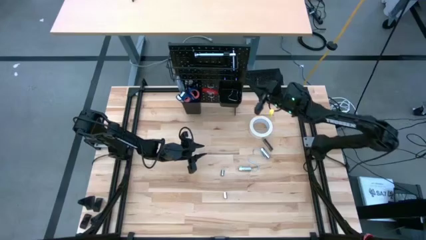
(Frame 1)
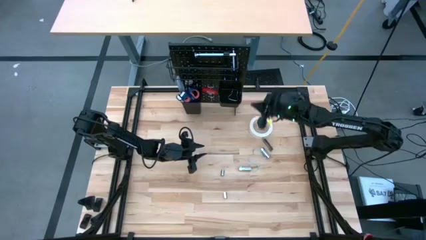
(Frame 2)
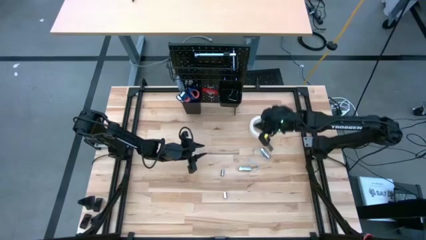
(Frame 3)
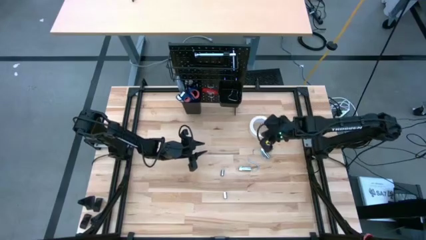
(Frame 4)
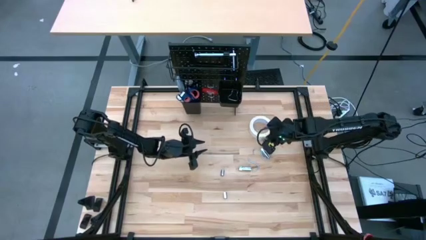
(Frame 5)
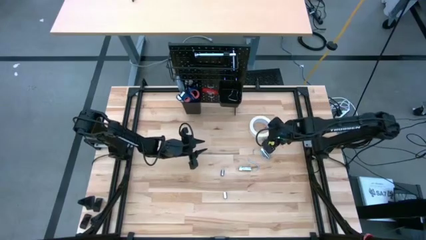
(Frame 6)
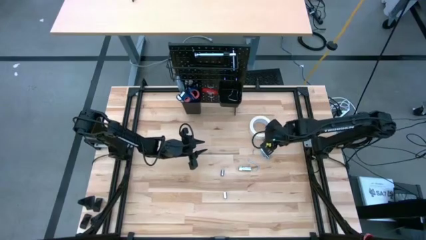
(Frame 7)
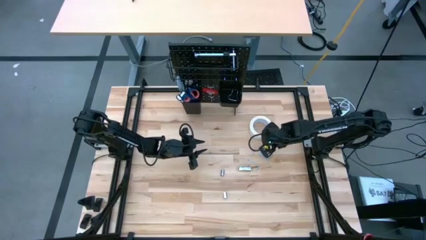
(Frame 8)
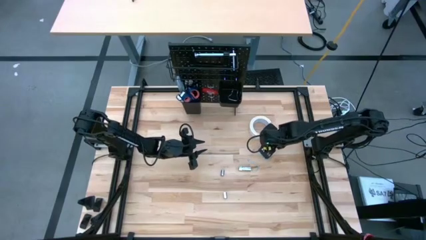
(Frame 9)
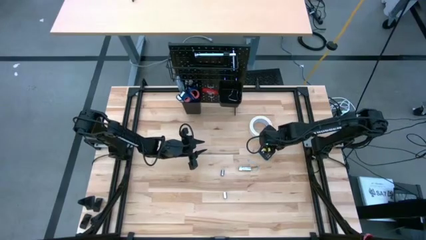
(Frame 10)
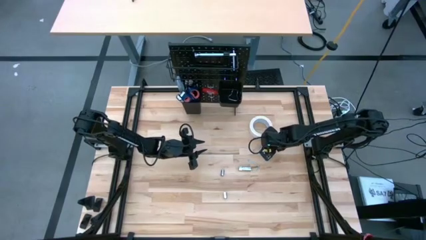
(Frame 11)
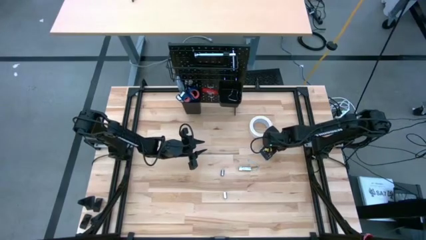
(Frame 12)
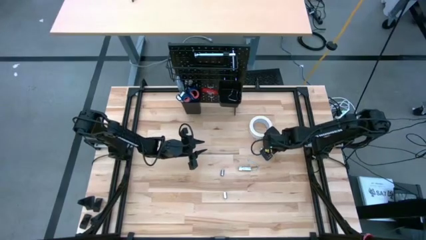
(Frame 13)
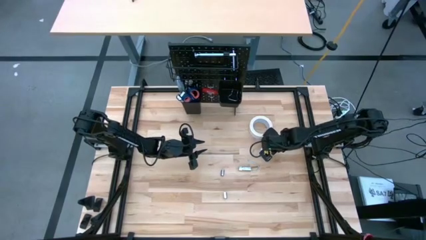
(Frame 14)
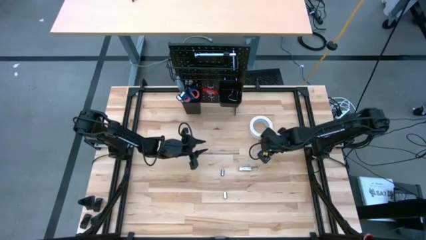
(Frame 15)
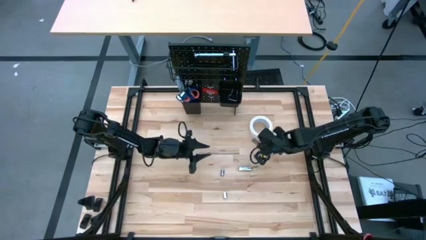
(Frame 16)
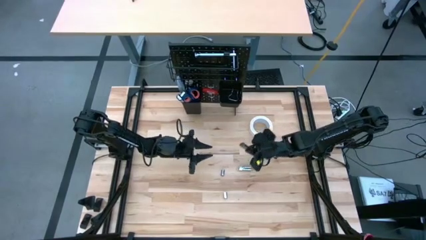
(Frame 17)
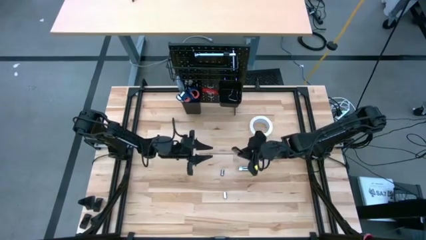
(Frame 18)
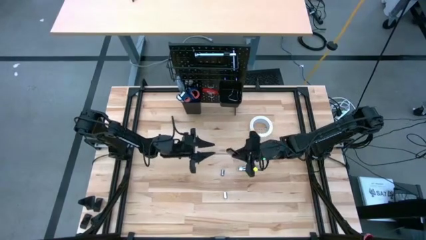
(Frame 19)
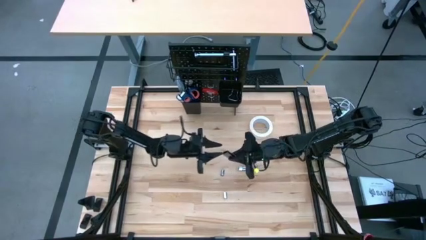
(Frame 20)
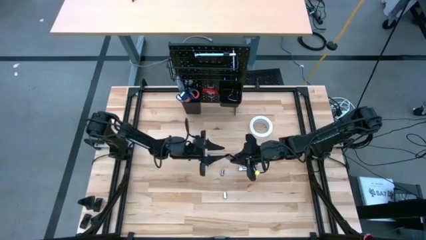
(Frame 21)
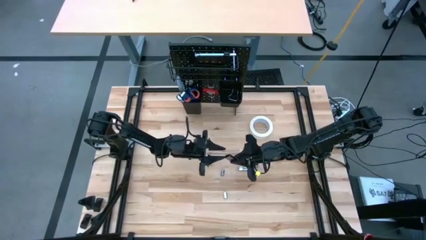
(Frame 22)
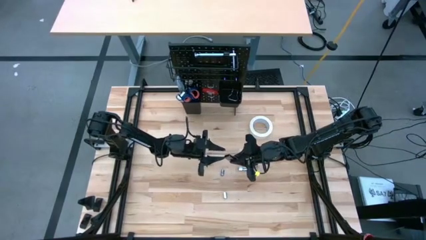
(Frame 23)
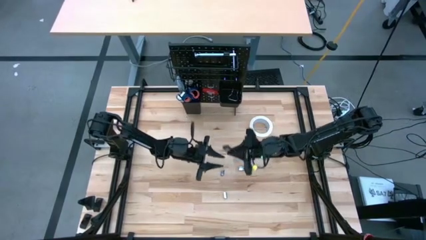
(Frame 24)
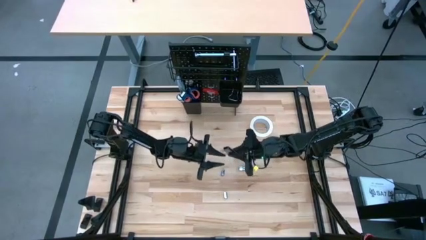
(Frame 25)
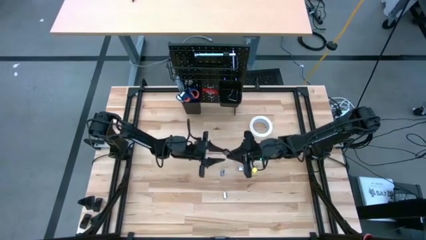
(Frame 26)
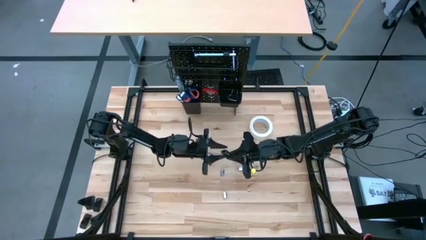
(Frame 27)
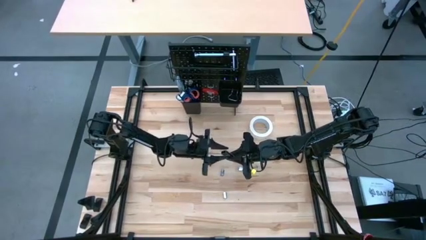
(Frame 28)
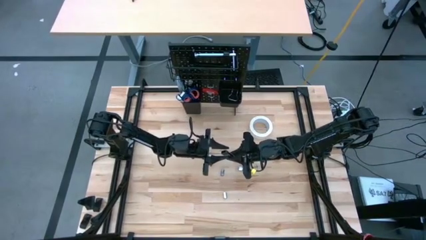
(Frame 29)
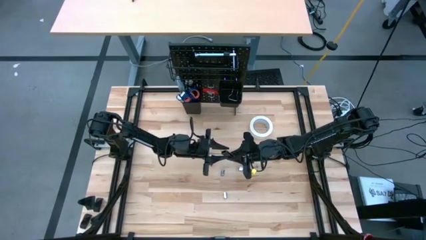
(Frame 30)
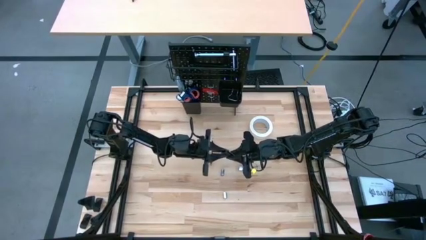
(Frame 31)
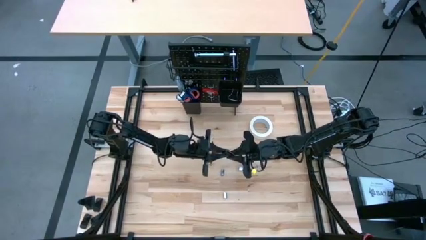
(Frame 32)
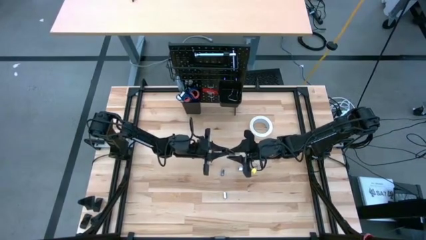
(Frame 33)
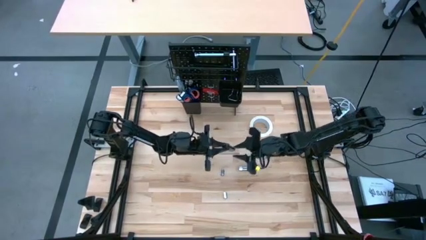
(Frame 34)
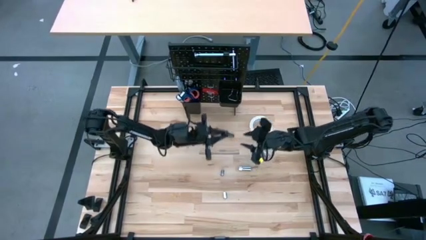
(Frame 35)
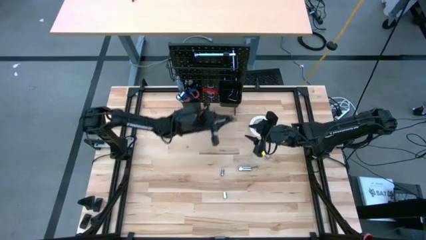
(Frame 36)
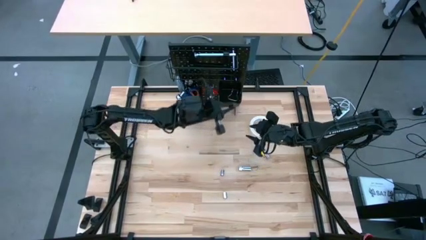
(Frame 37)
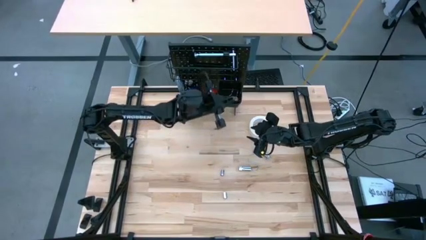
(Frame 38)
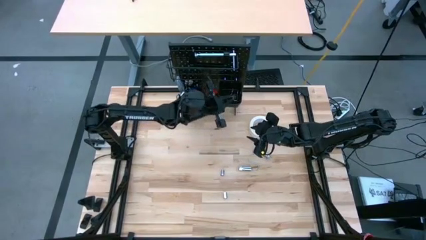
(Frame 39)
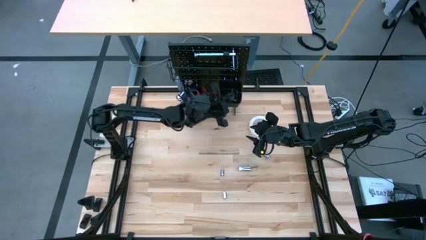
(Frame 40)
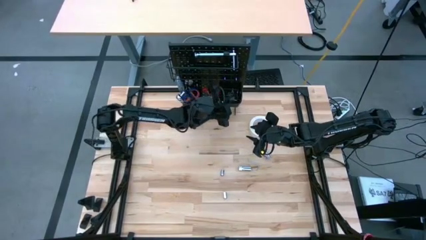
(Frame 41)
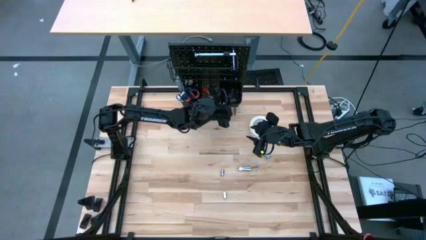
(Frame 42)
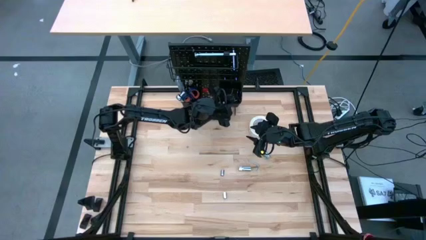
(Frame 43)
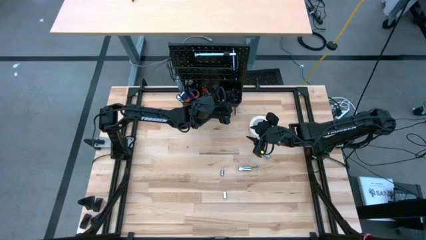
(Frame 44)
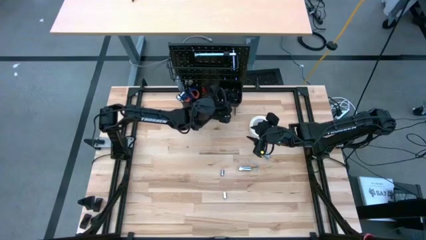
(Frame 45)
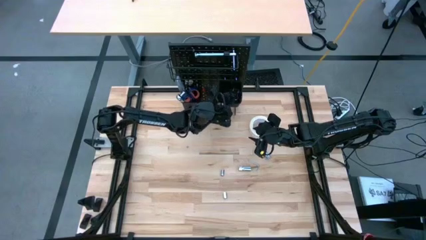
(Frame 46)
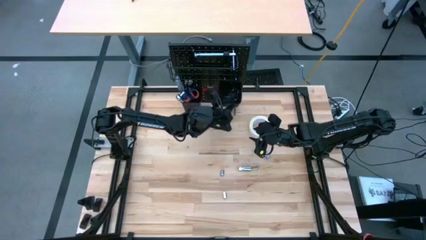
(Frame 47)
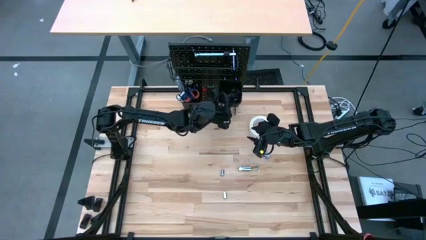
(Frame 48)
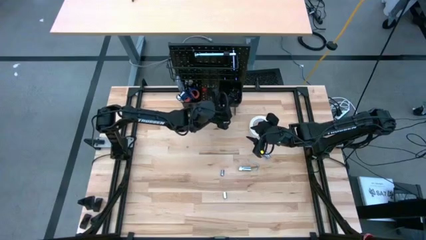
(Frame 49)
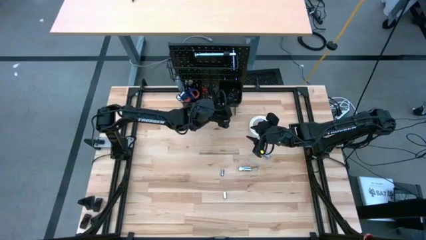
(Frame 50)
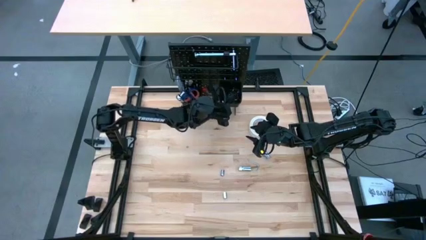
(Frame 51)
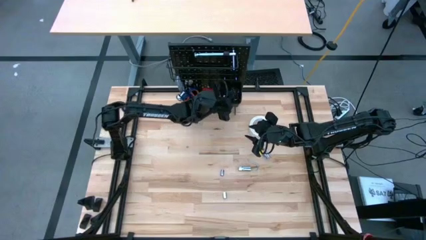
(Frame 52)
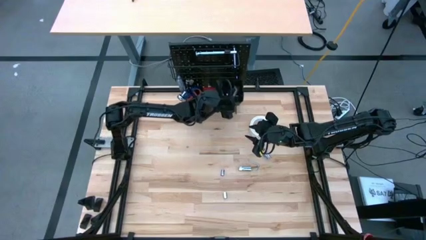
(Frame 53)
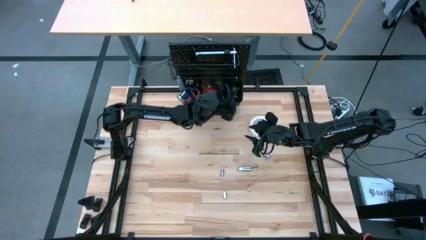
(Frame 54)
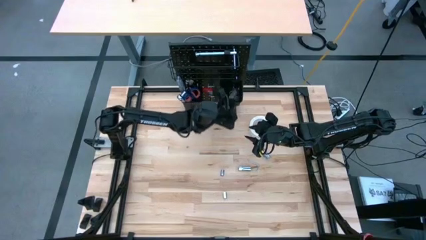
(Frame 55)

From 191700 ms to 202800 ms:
Task: Hang tools onto peg board
Put the black rectangular tool into the right black bin on the peg board
